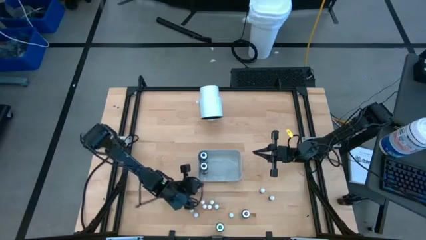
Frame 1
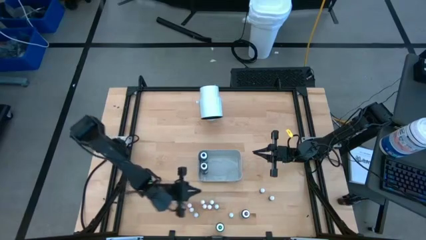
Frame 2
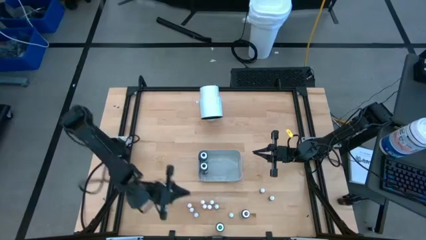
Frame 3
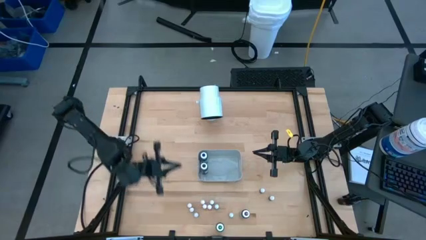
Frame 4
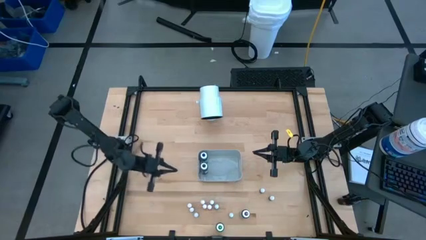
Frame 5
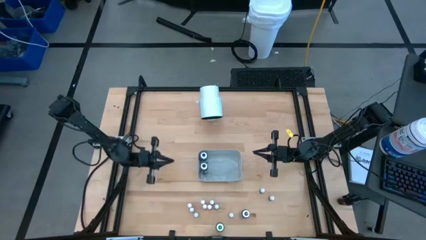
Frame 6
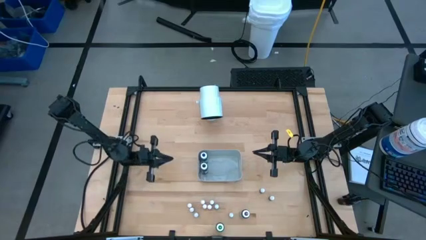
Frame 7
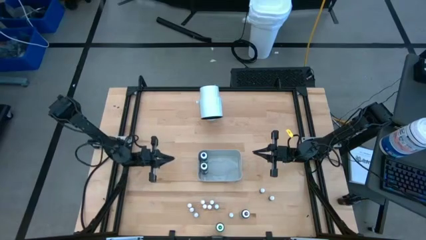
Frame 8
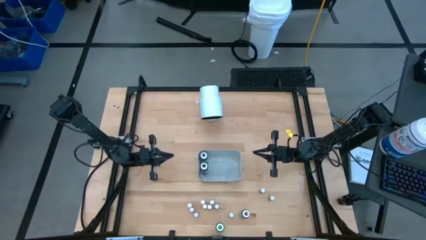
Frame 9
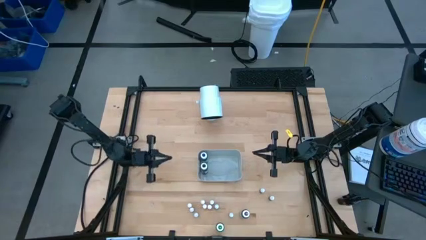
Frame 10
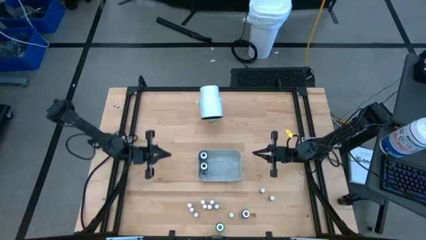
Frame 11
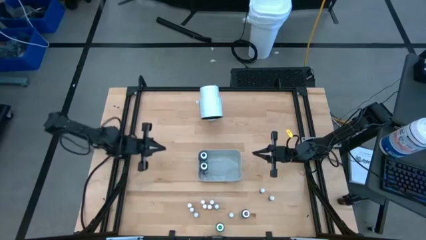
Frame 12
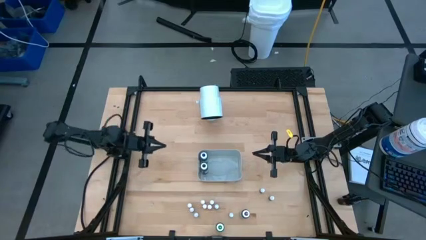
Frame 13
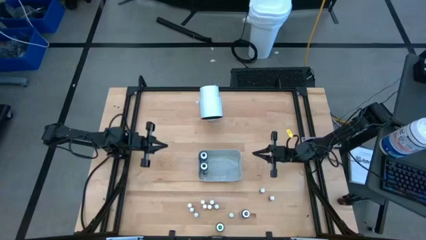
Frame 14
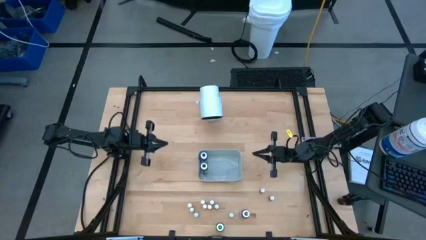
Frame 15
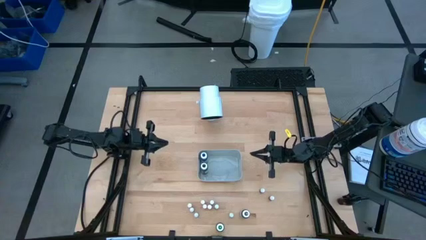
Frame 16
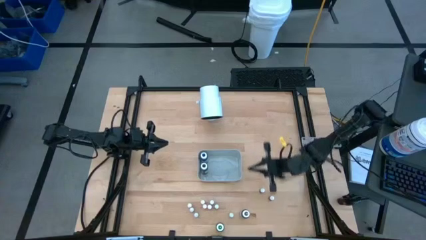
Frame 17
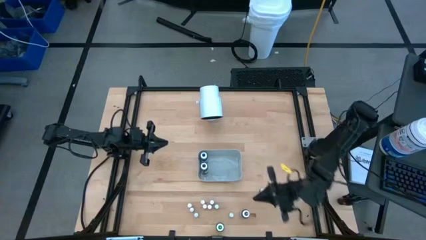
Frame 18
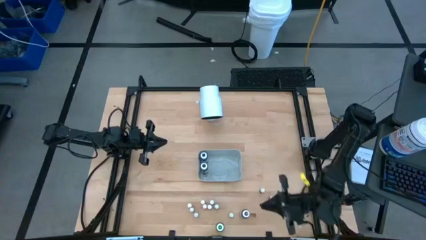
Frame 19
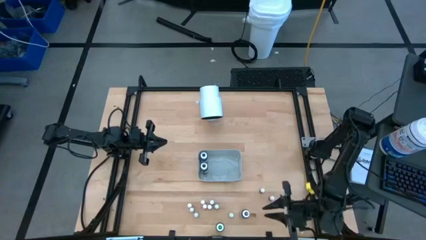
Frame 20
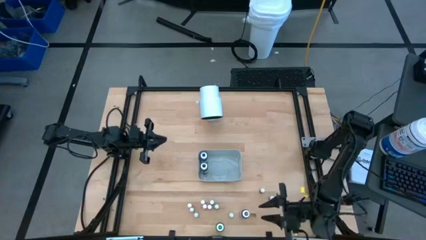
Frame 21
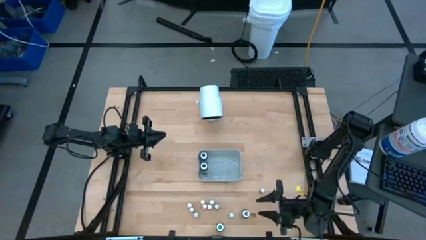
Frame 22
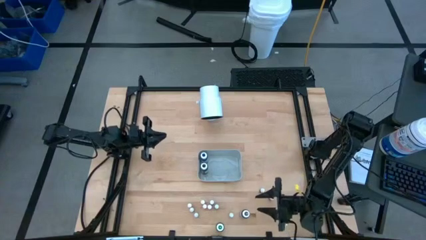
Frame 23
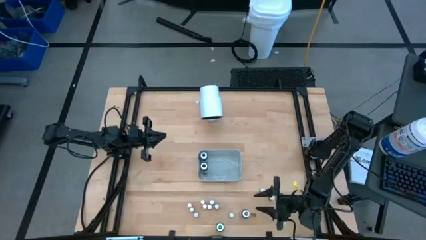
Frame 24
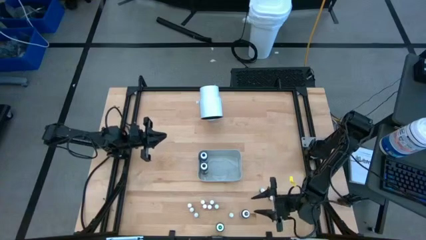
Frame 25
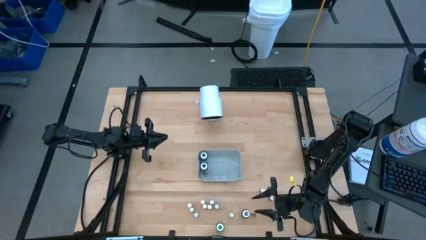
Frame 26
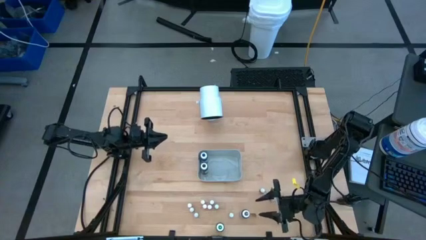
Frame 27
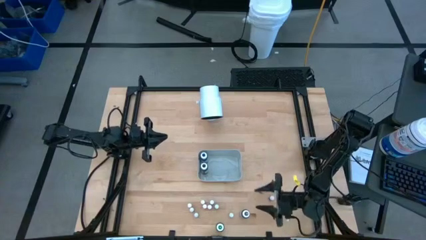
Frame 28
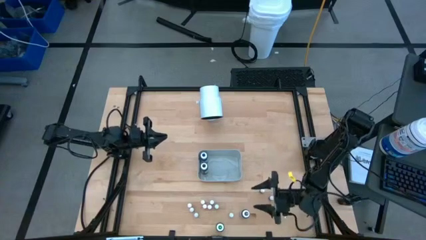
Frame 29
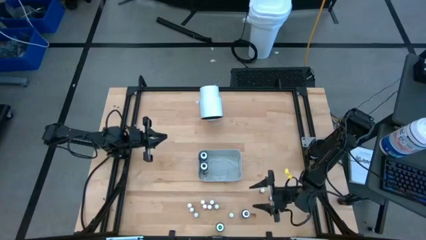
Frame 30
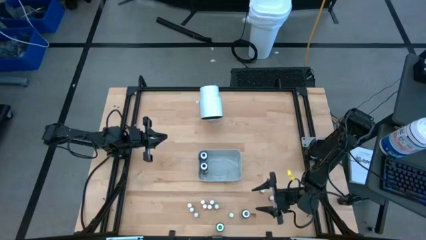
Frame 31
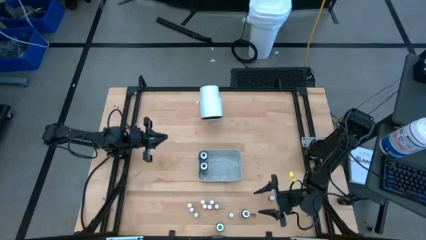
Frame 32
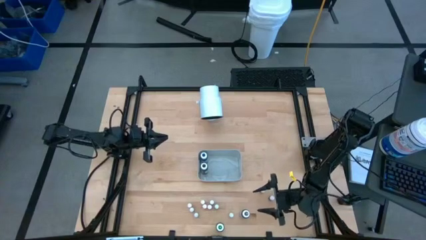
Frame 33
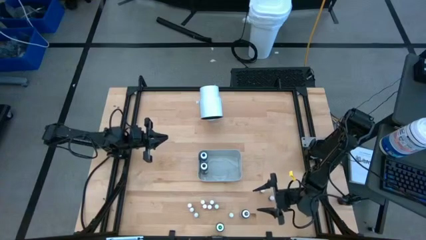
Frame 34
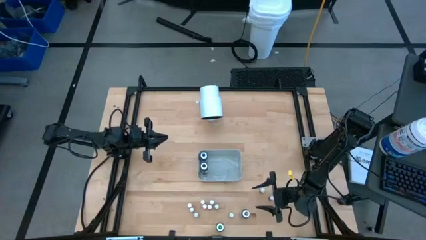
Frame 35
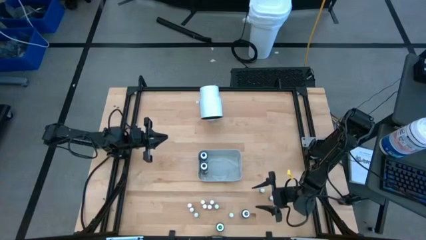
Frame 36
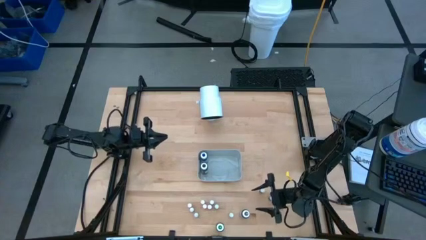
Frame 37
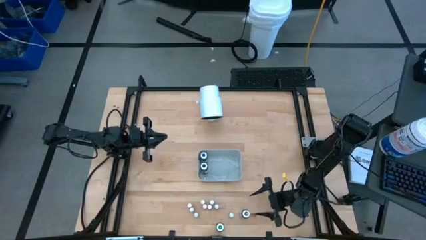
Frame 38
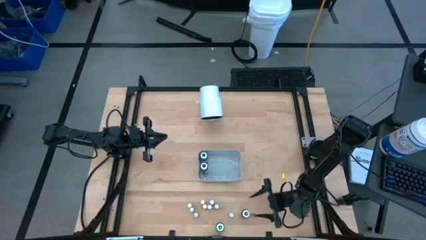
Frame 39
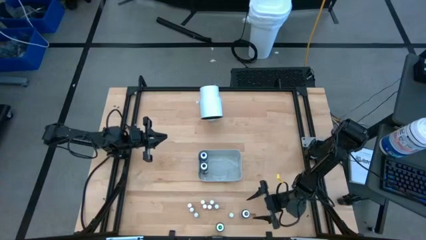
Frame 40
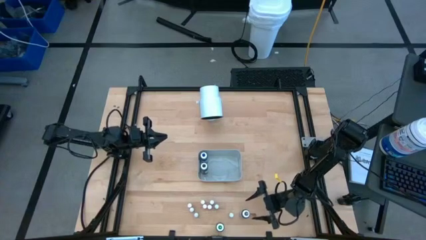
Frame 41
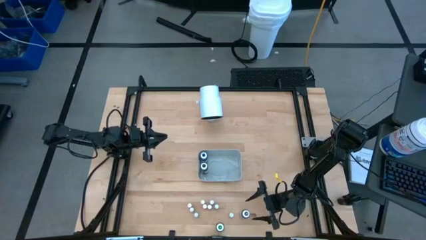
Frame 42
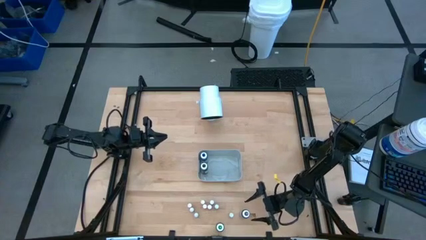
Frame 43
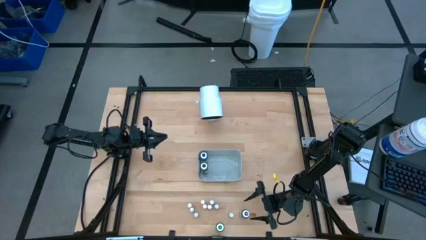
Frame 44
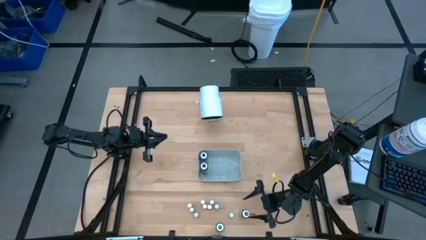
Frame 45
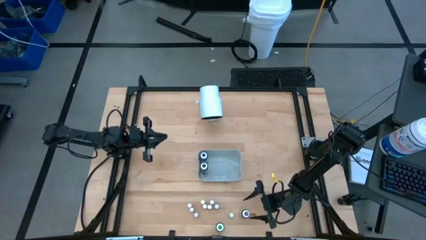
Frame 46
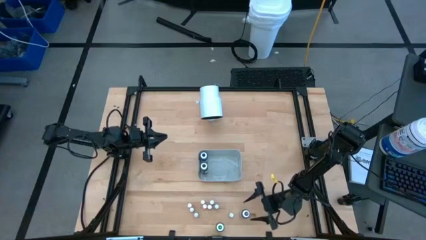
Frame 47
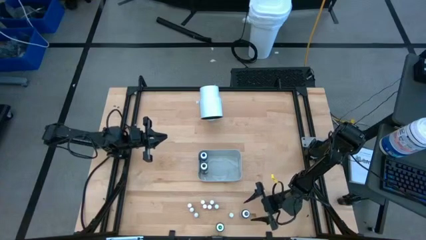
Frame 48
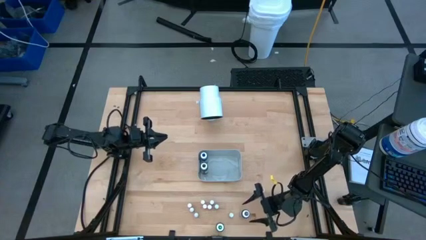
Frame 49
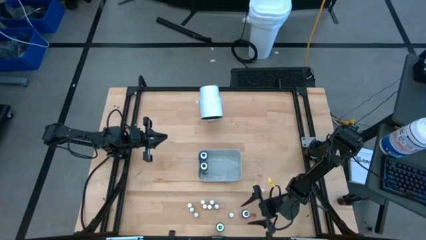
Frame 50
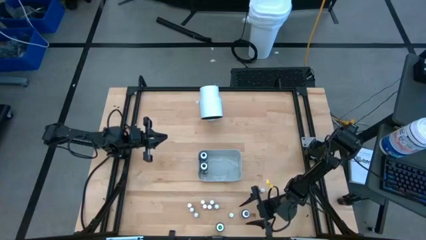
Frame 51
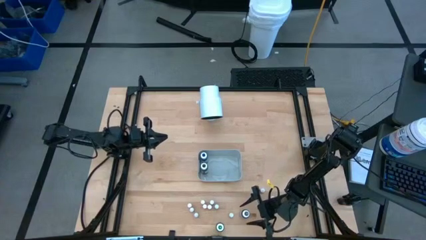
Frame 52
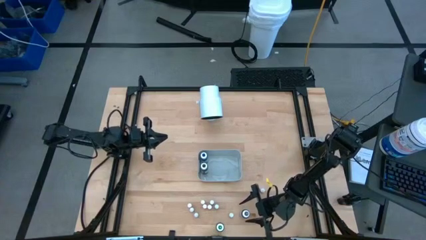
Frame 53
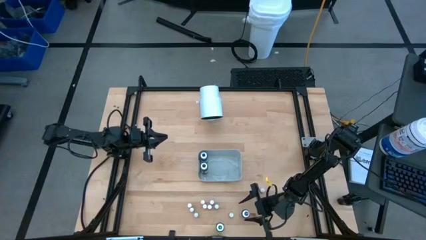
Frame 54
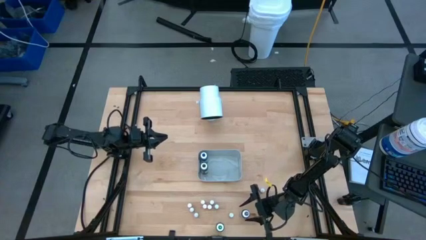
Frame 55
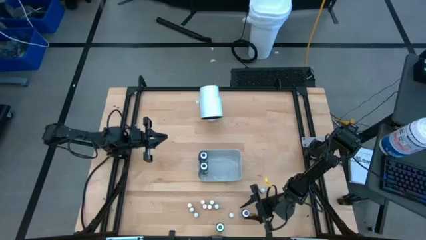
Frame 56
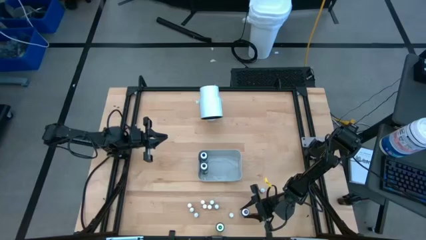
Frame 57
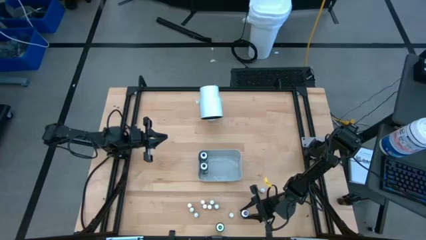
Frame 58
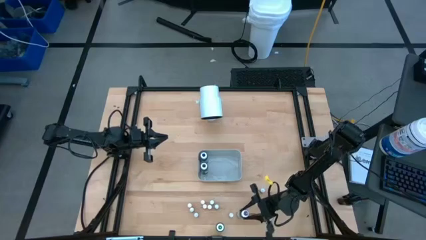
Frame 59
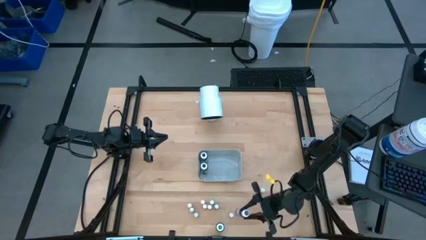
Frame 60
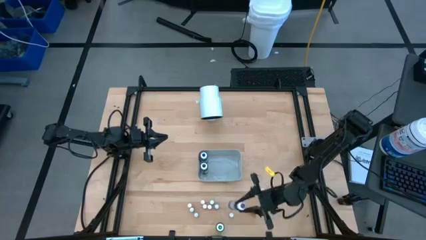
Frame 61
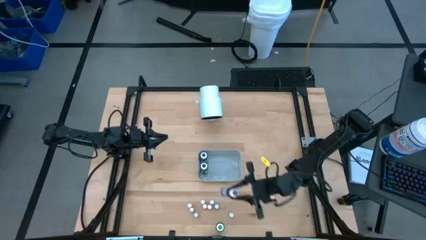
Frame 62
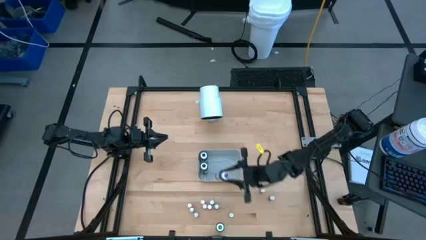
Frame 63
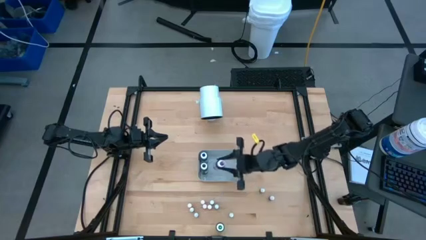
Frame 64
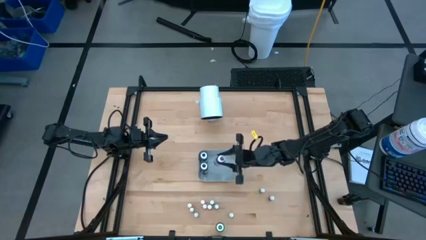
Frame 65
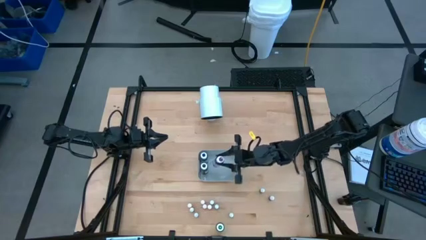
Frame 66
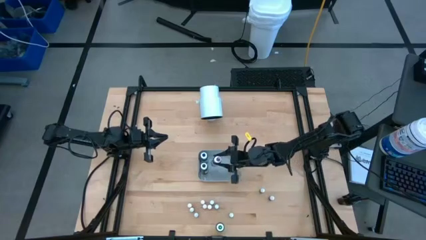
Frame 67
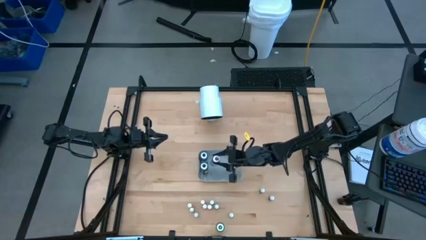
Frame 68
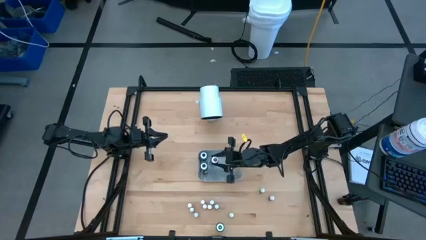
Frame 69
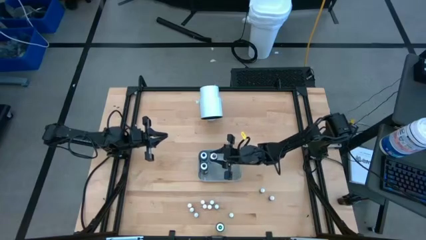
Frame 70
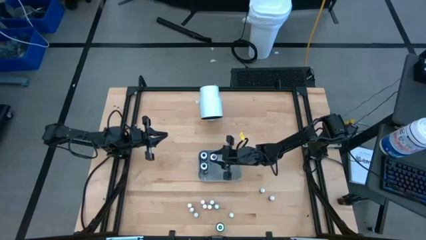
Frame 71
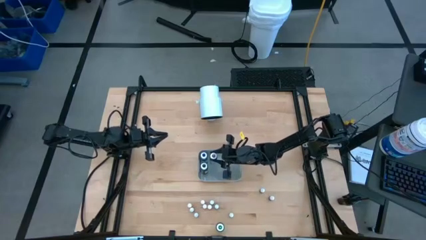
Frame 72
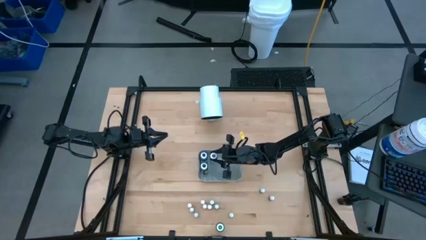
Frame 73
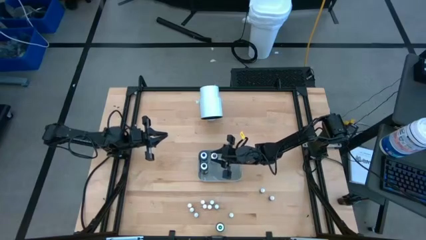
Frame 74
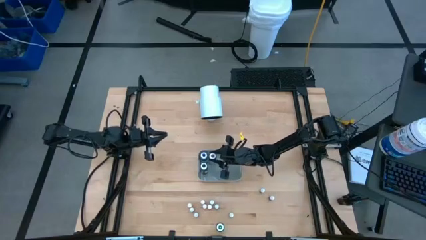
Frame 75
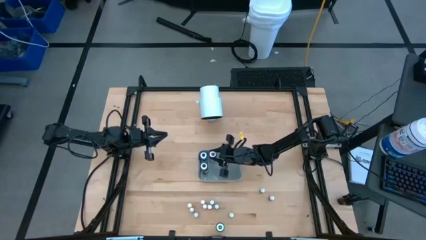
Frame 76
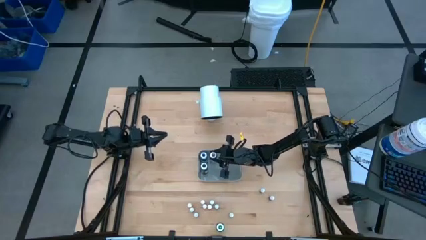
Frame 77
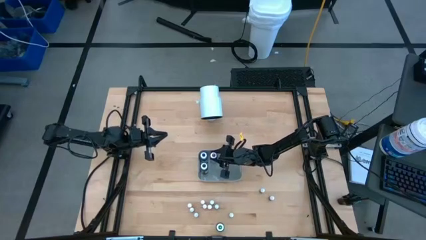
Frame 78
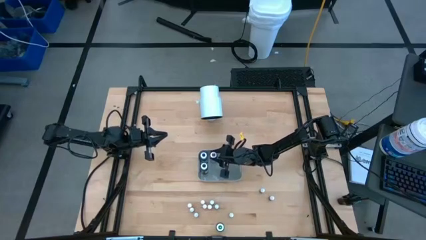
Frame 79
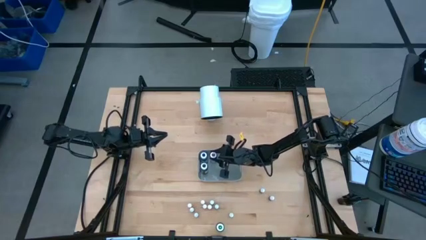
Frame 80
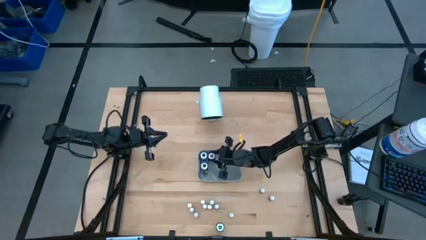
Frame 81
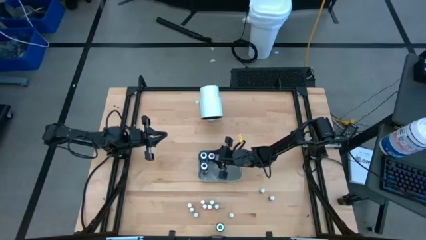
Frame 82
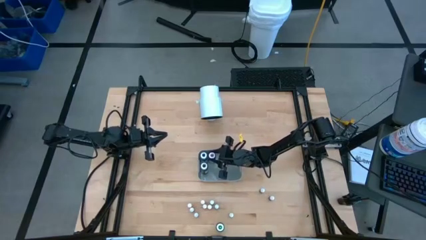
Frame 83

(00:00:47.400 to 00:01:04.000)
Task: Pick & Place food coloring
Put the large purple food coloring bottle into the gray bin
